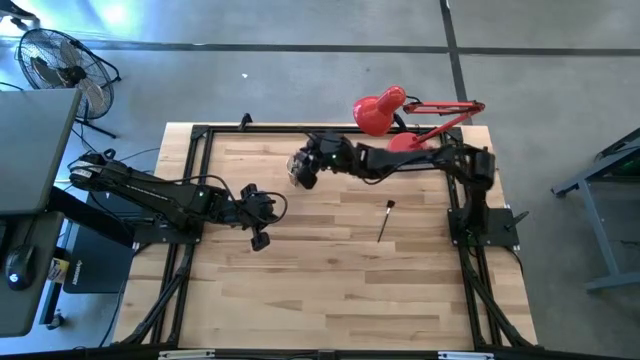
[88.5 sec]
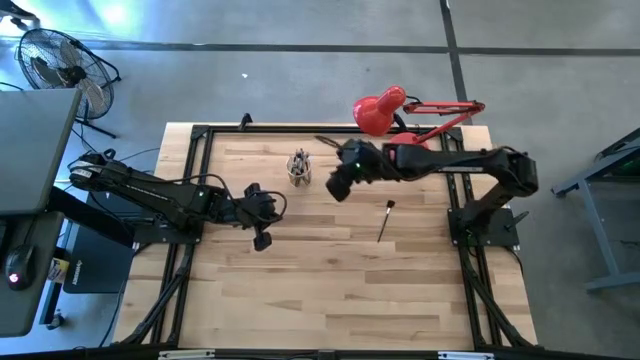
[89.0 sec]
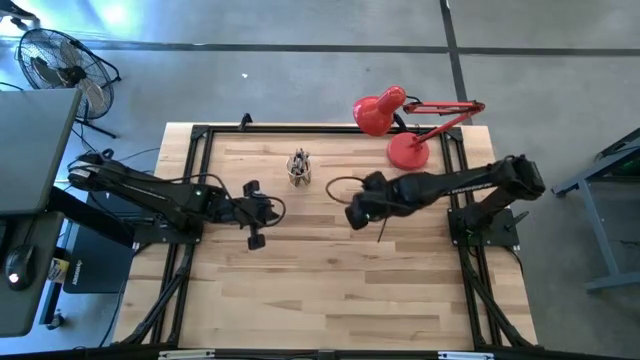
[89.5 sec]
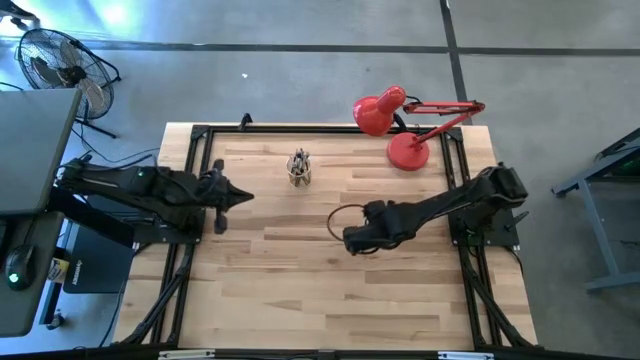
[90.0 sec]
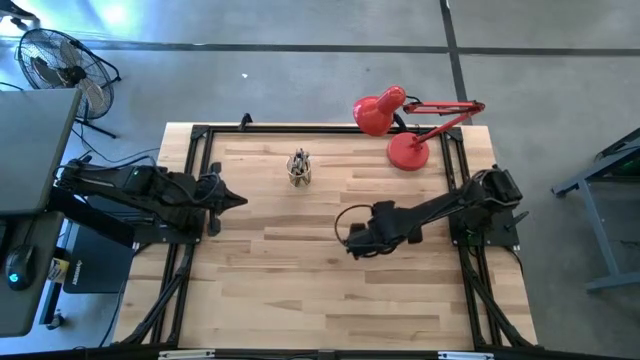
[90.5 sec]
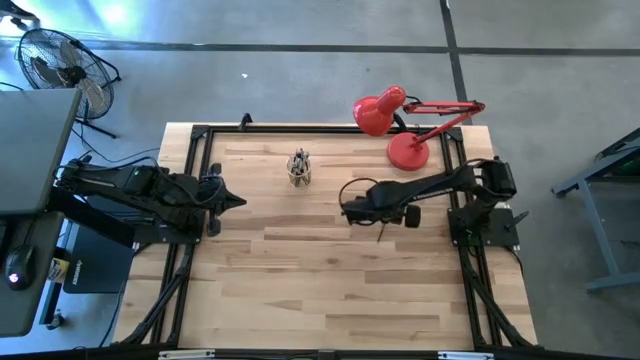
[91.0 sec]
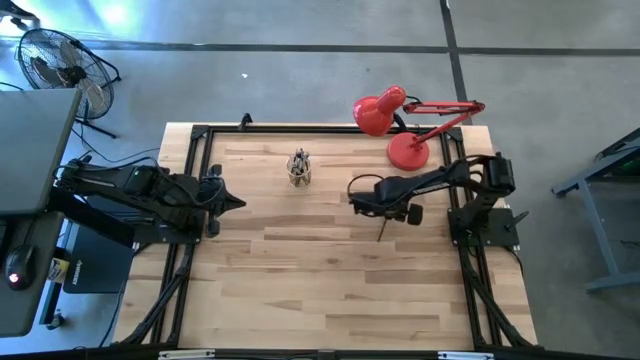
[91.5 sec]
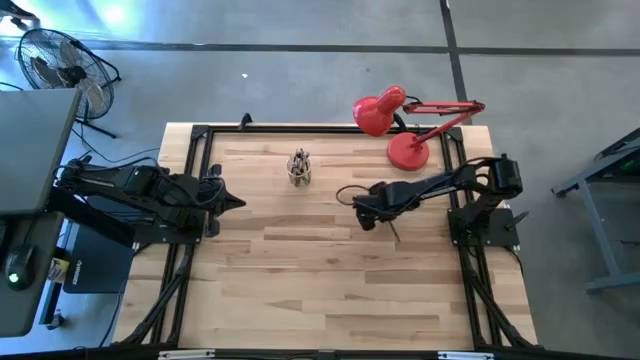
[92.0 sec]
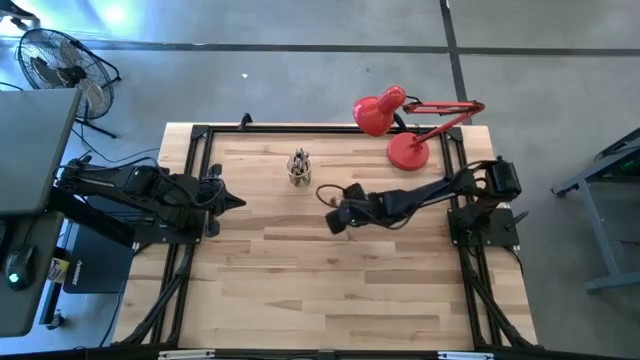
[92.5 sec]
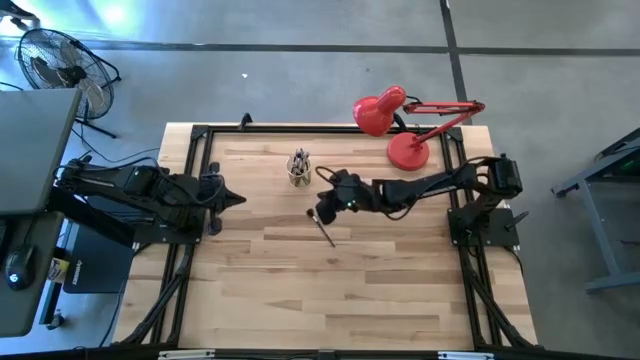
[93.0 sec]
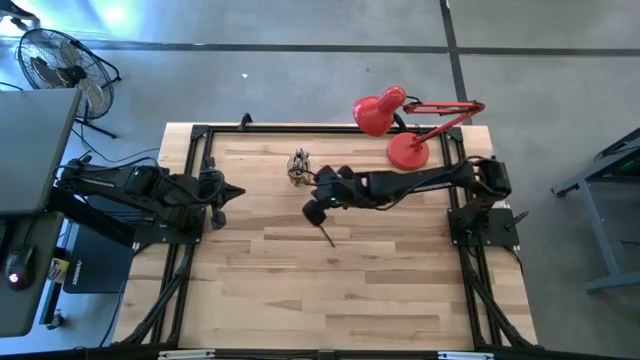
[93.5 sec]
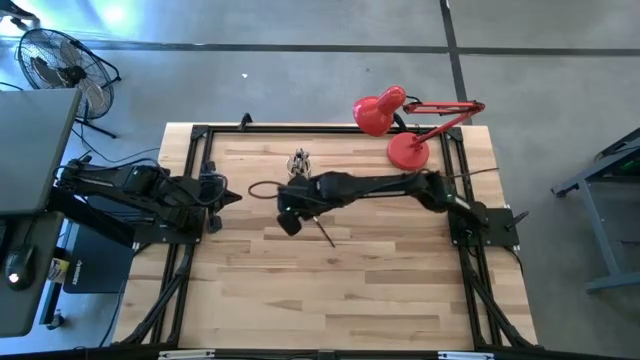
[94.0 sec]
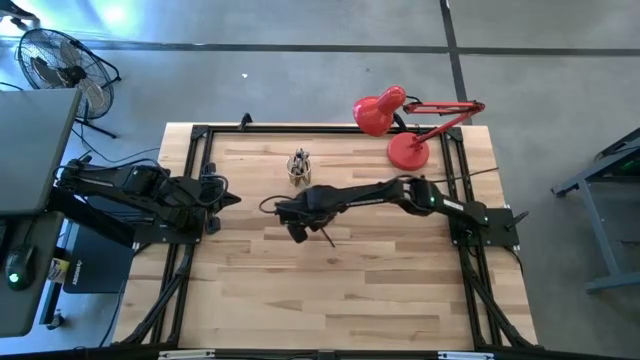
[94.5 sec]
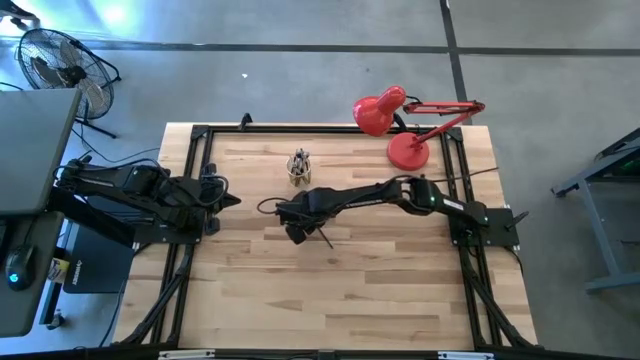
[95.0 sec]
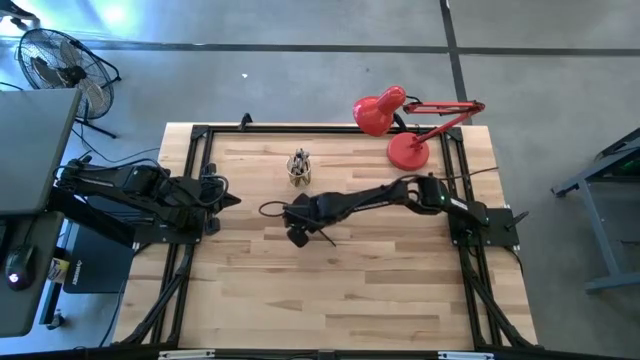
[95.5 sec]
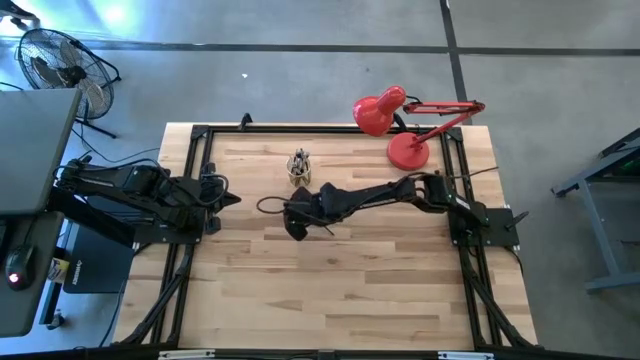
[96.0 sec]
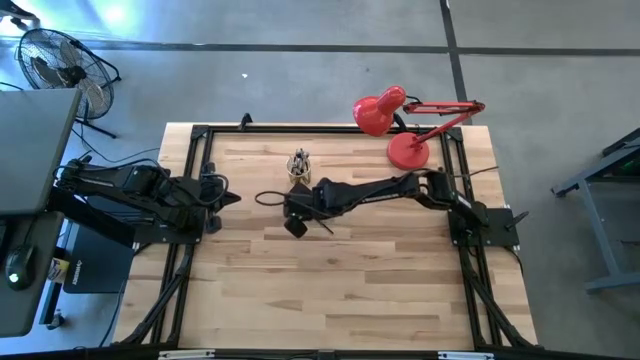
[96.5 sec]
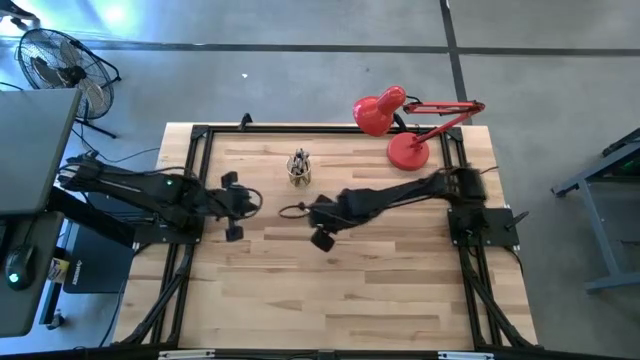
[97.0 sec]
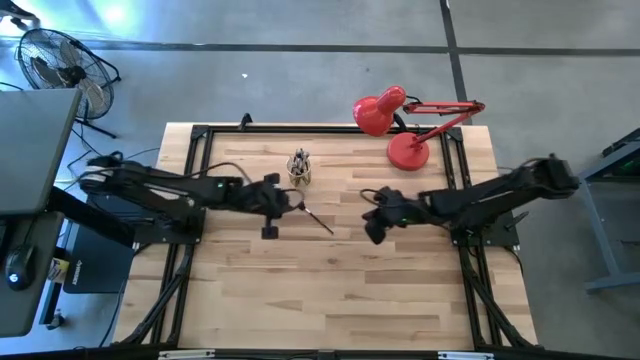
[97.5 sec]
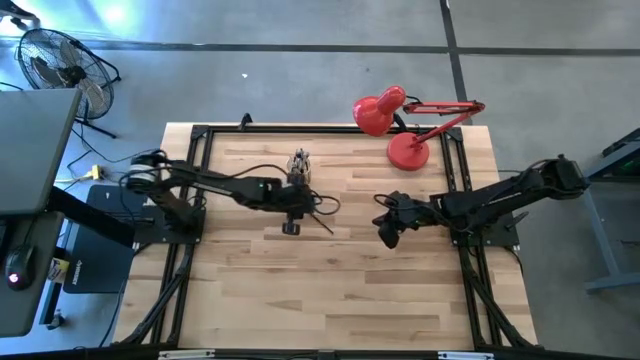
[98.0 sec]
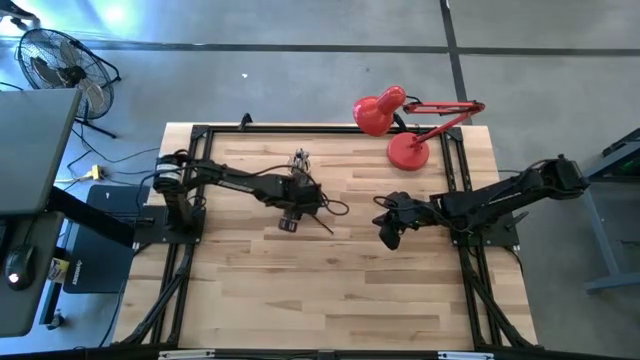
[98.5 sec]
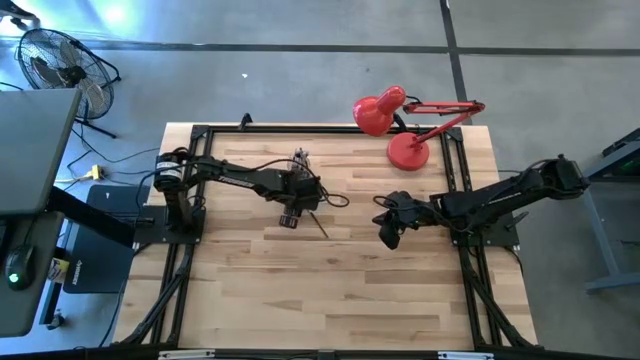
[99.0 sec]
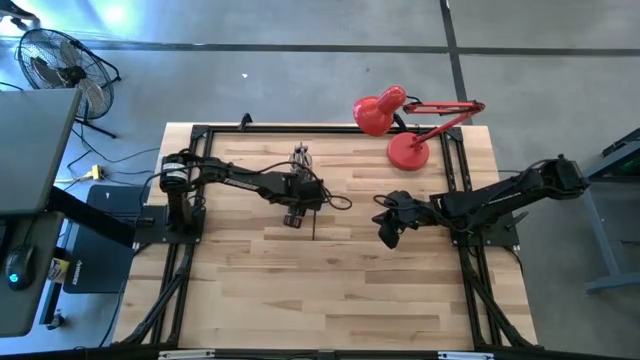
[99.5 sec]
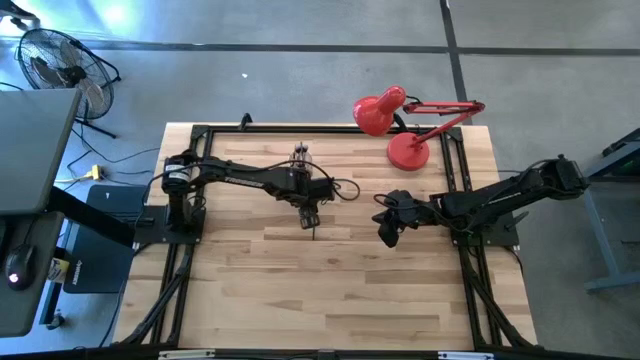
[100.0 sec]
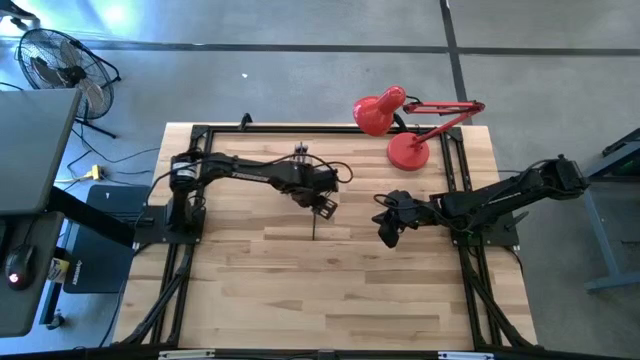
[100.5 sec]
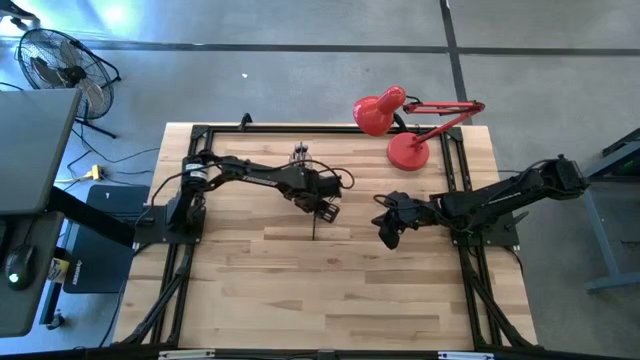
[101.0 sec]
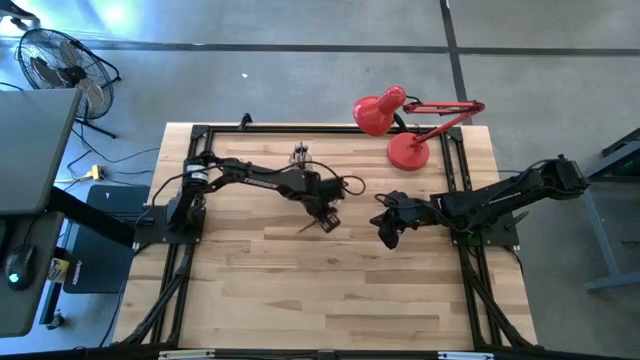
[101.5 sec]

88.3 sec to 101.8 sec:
Task: Put items in baskets/containers
Put the lash brush into the wire organizer

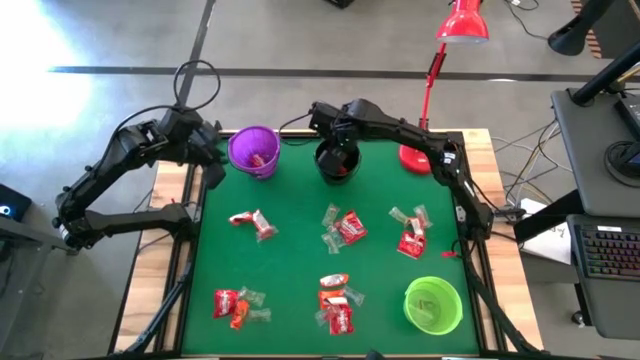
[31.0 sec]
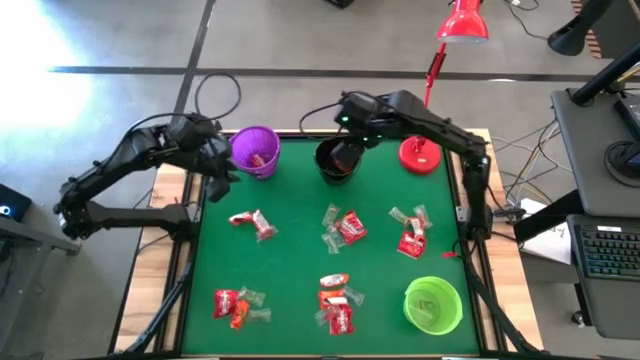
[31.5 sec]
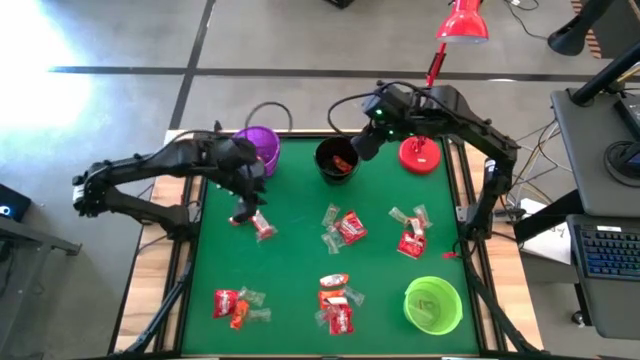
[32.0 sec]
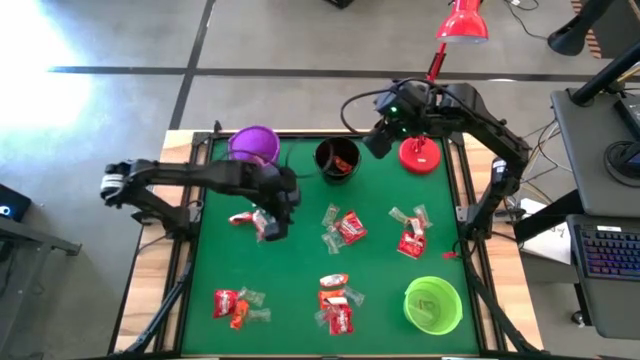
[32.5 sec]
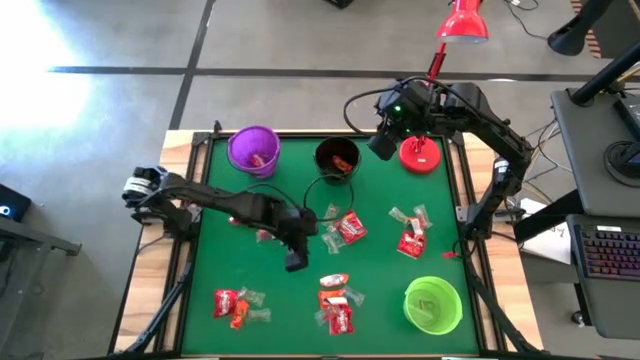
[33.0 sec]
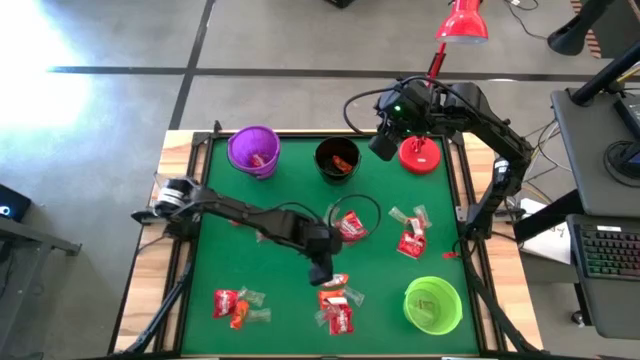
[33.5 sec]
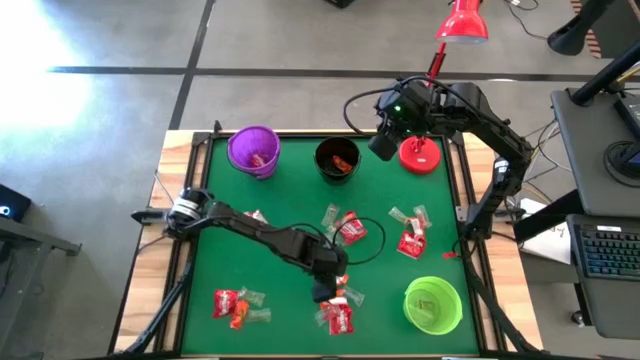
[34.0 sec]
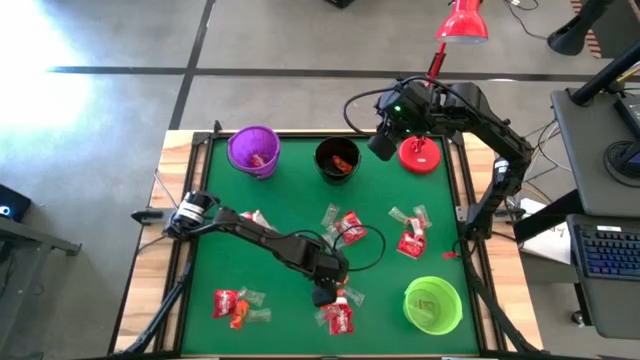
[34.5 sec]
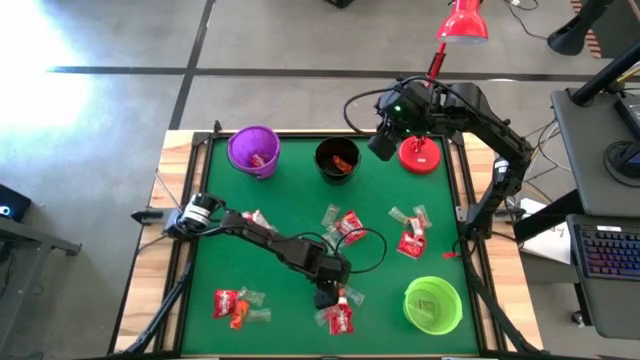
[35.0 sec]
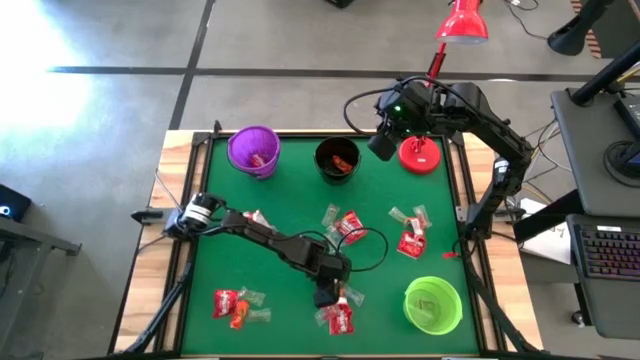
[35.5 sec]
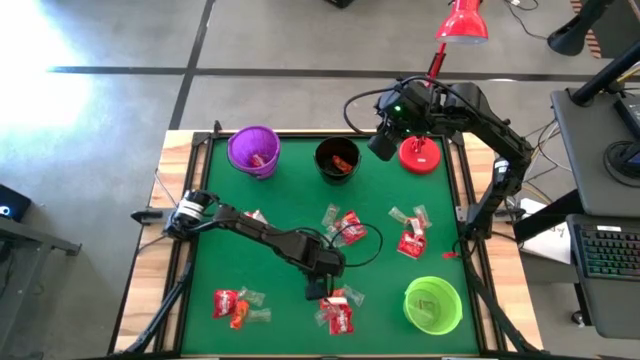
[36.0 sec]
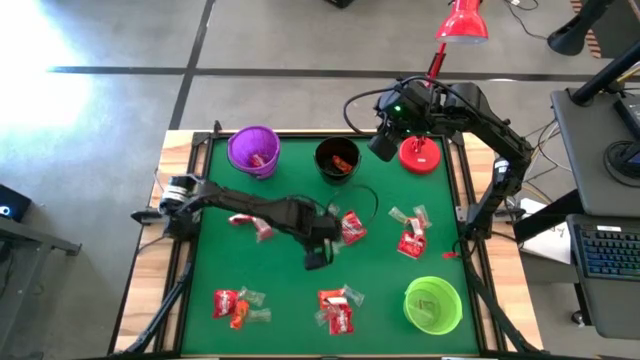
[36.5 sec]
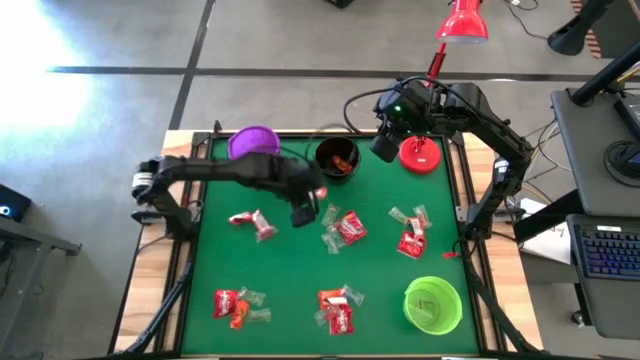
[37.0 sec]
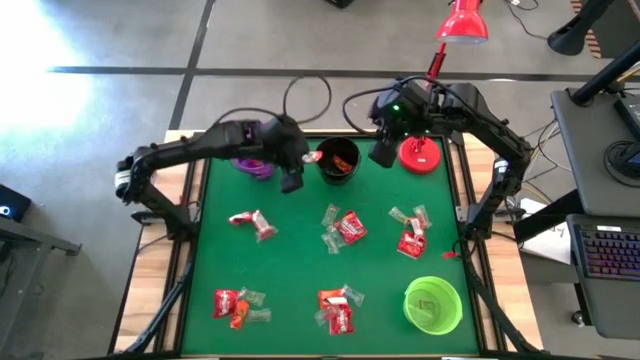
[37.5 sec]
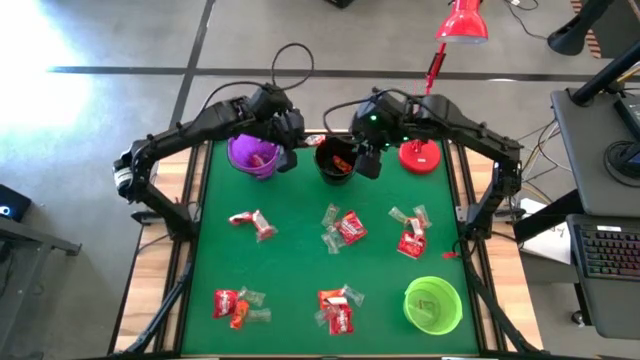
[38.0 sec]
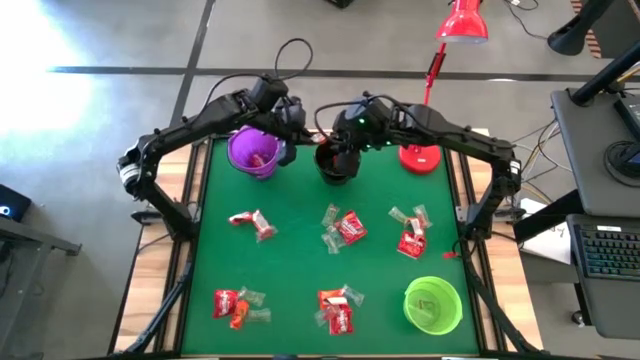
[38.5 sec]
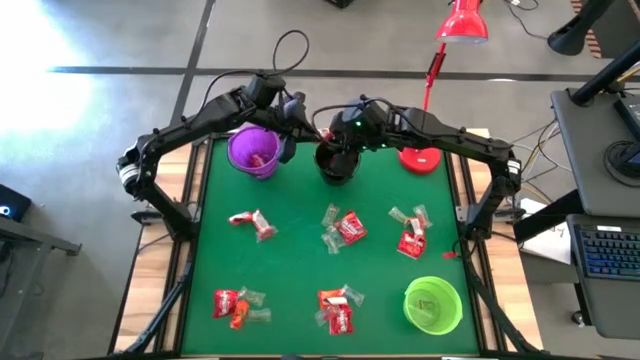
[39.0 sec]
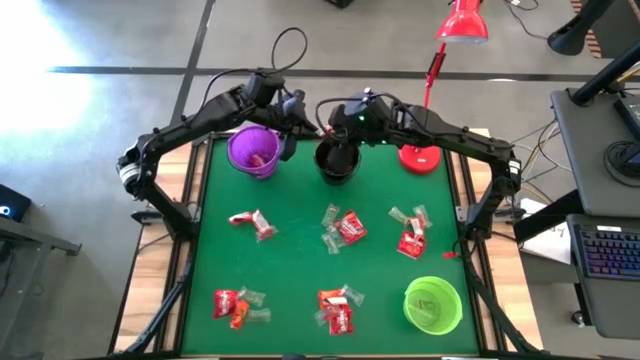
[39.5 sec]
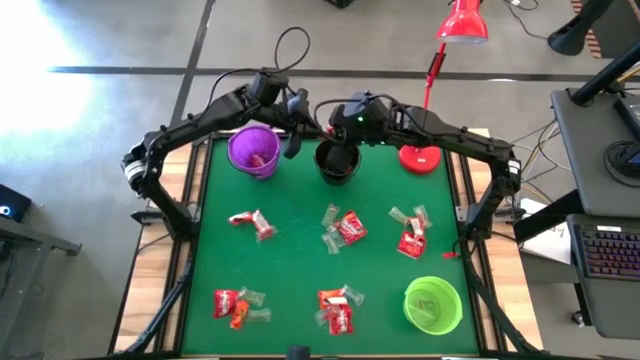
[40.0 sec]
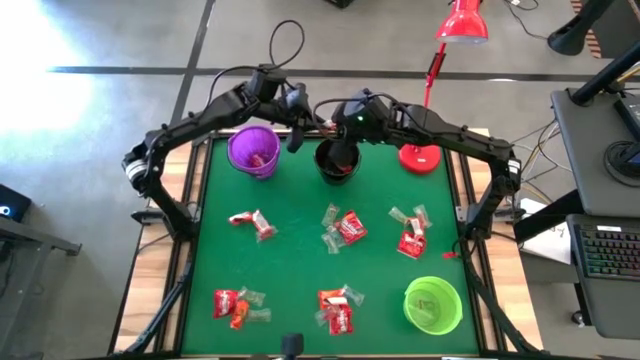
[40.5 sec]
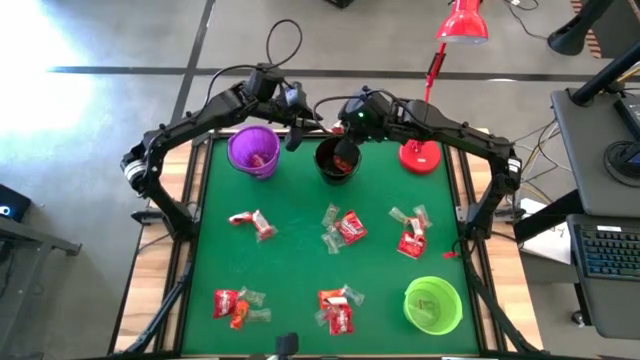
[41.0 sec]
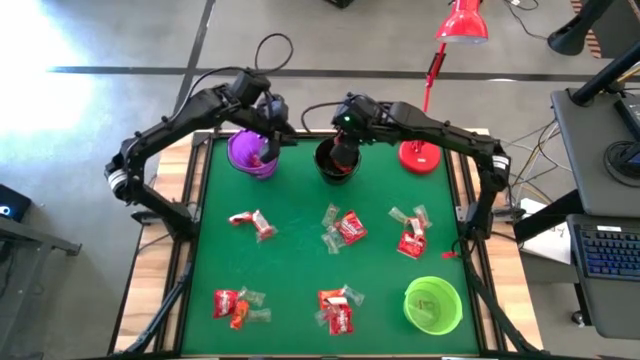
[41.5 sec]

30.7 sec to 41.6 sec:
Task: Sort candy
Put the orange candy into the black bucket
